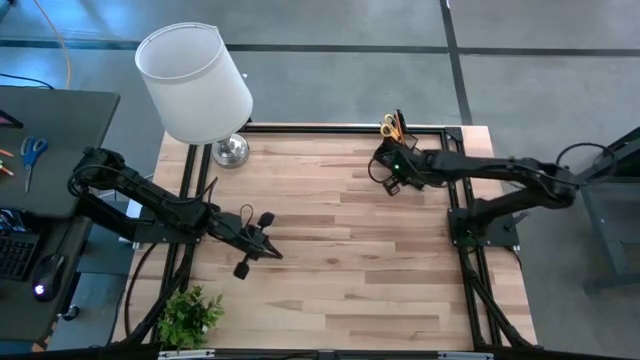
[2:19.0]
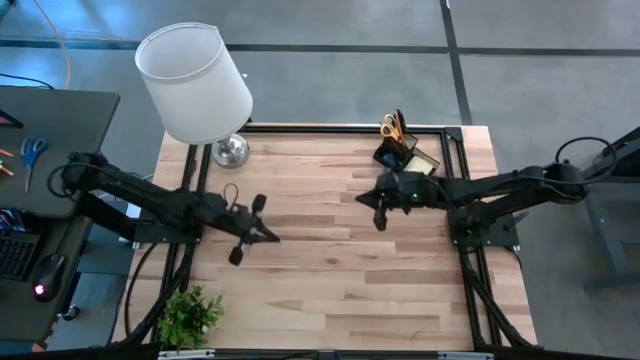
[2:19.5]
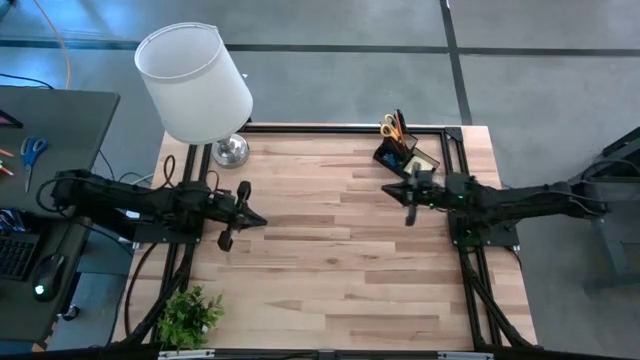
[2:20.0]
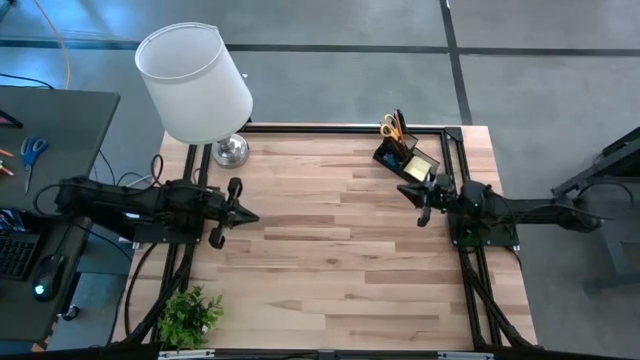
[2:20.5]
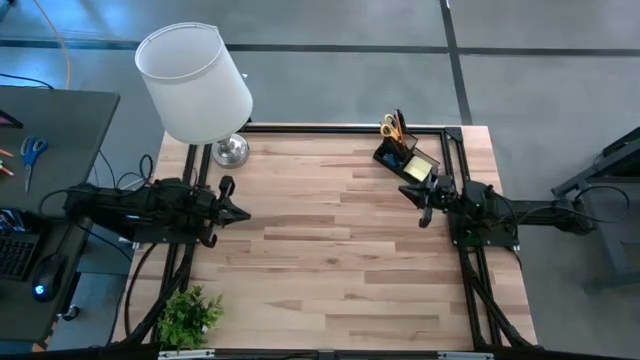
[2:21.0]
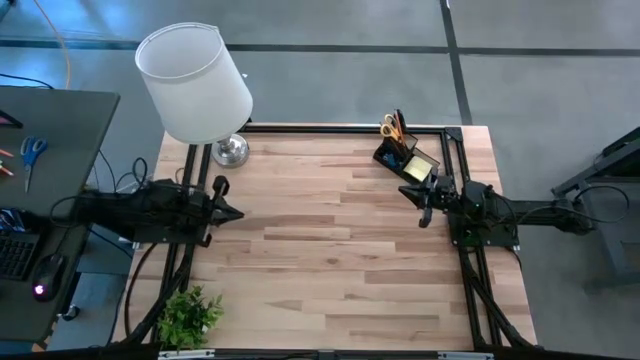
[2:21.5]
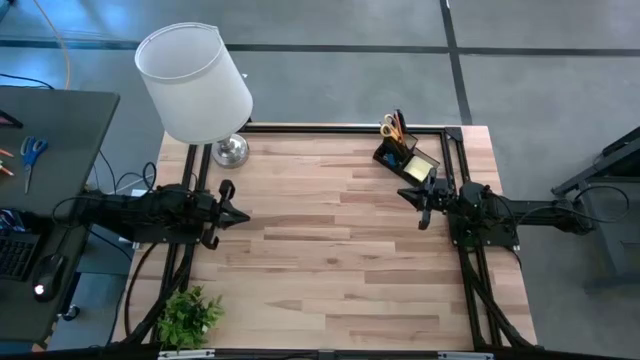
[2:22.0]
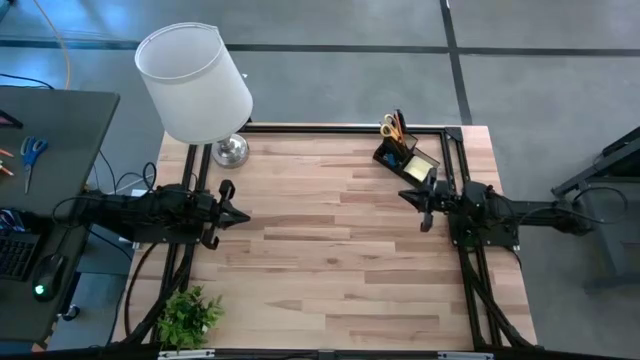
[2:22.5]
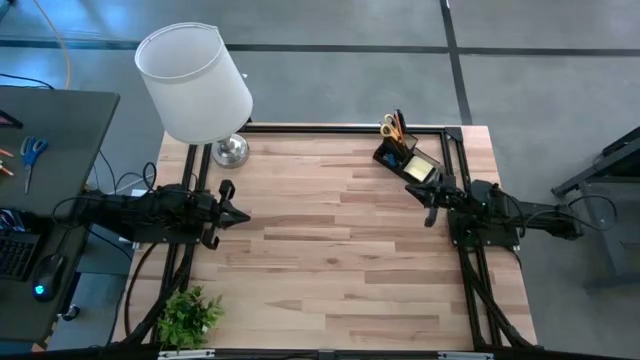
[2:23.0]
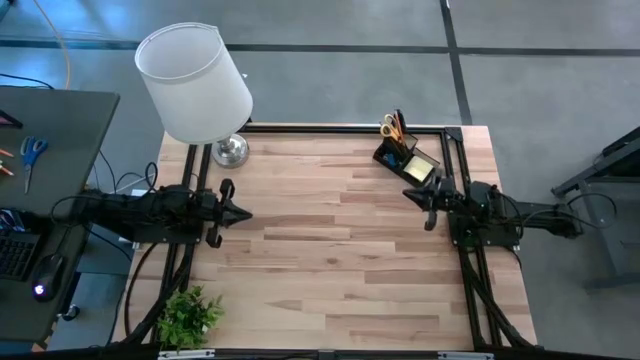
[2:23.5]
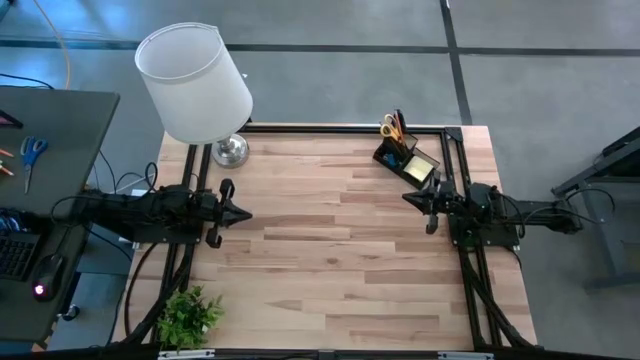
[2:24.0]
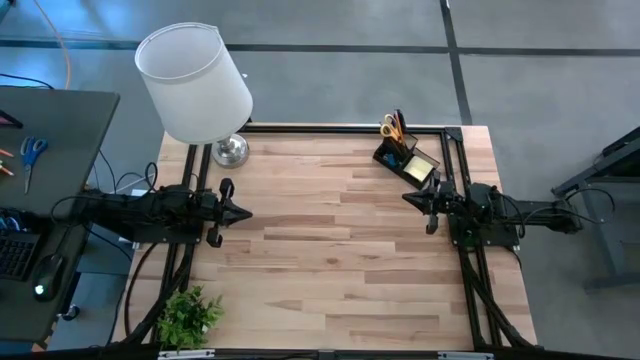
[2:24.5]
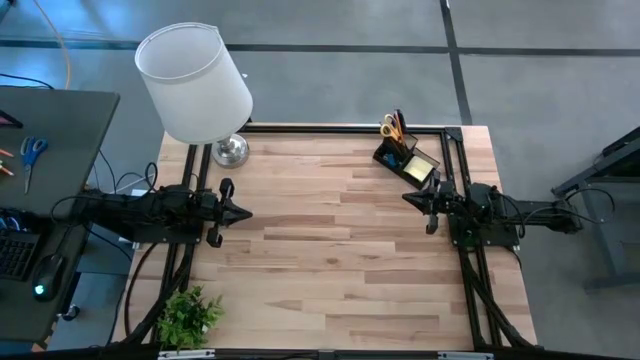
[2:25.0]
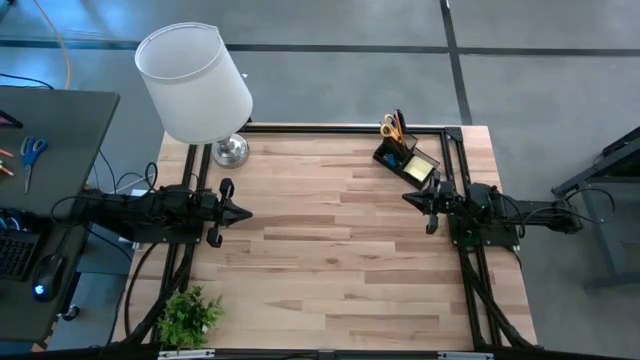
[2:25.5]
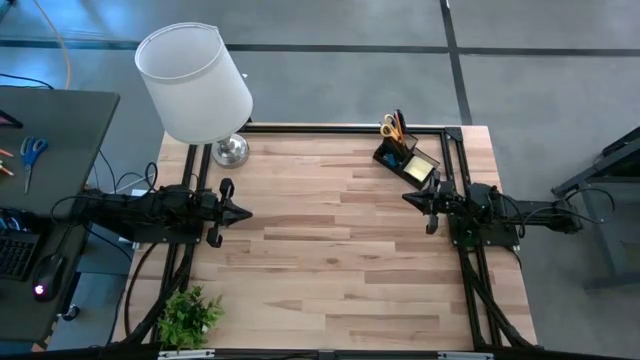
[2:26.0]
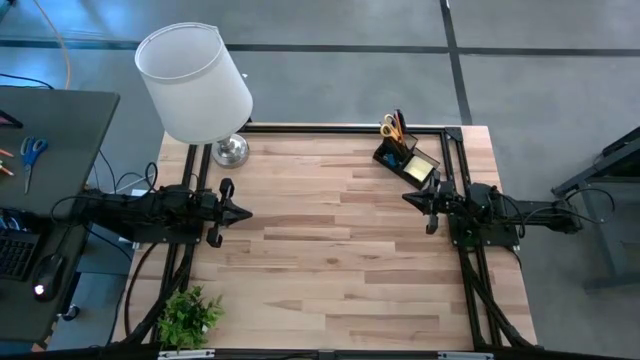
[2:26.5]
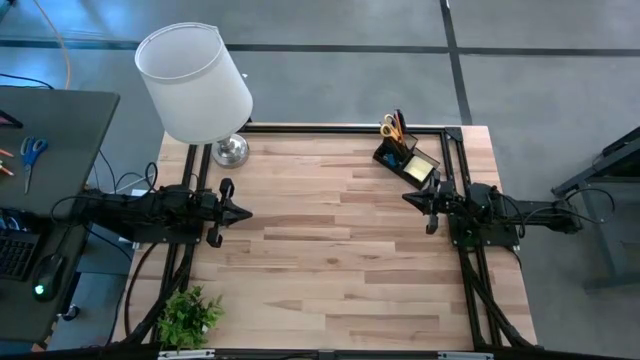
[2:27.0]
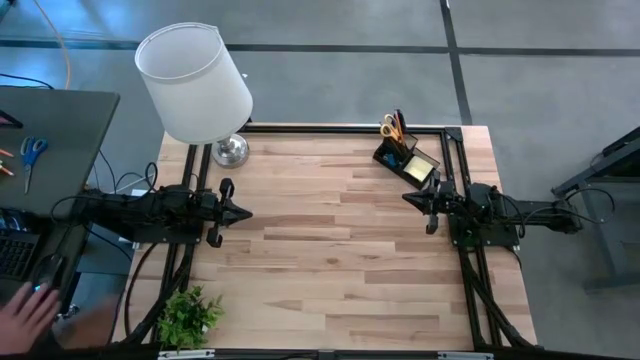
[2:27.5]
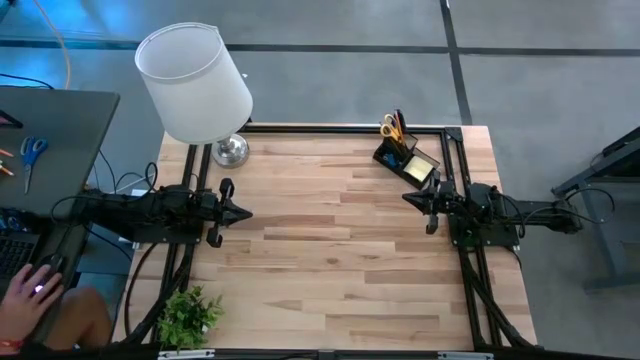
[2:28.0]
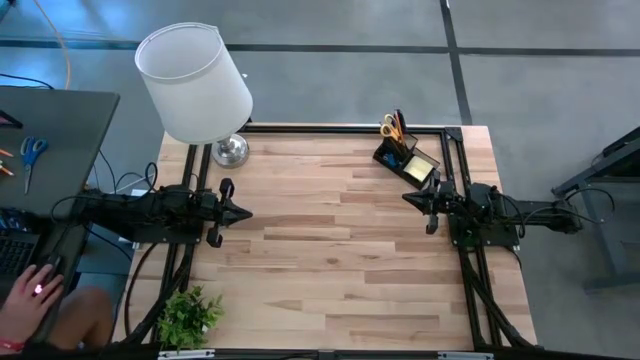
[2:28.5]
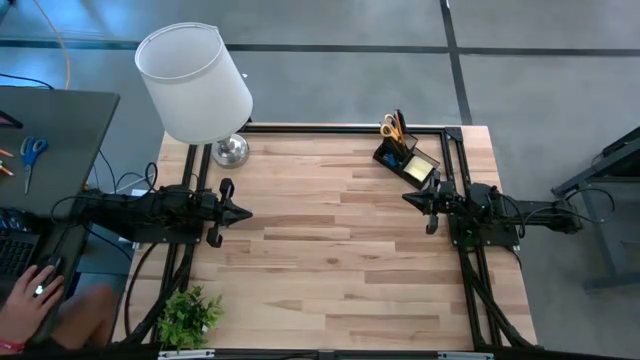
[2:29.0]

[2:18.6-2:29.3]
Task: Pick and place office supplies into organizer
Return to Home Position

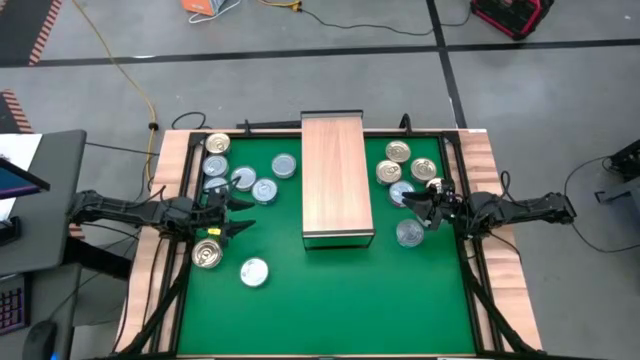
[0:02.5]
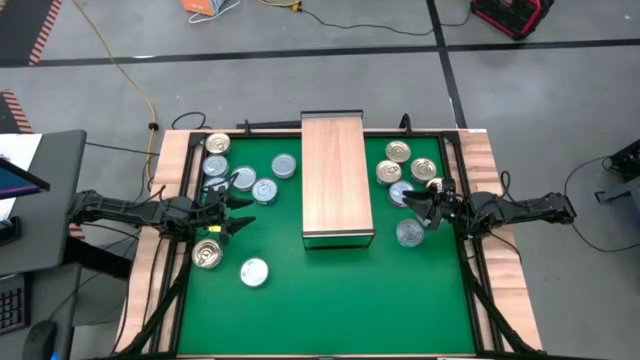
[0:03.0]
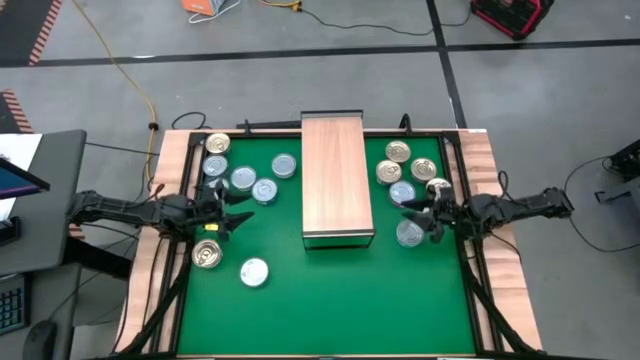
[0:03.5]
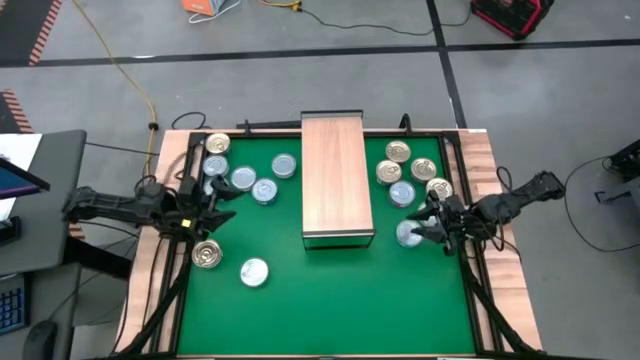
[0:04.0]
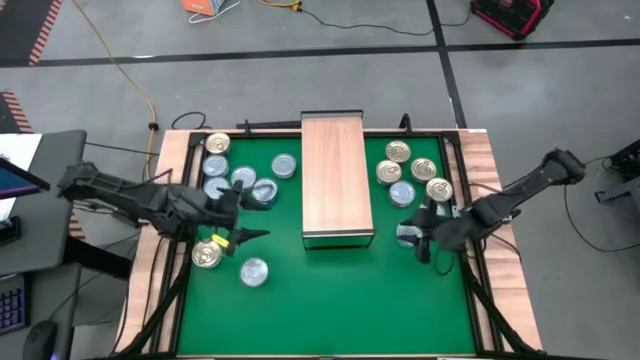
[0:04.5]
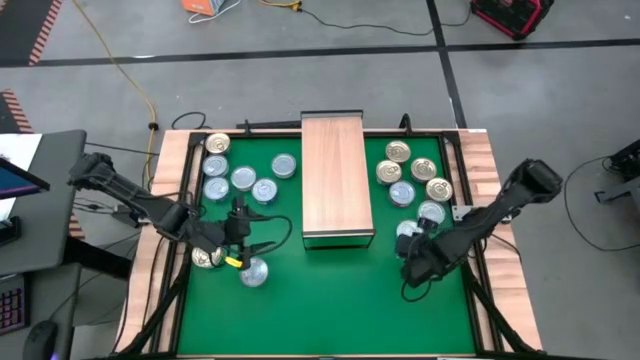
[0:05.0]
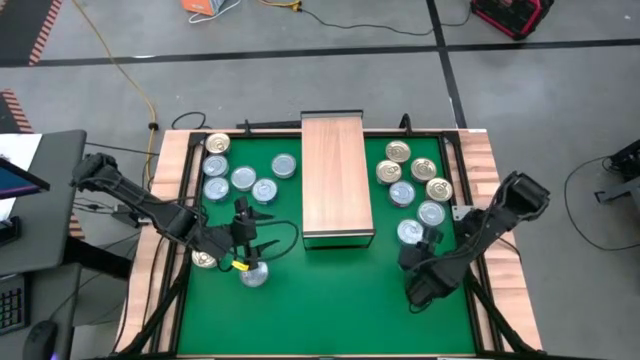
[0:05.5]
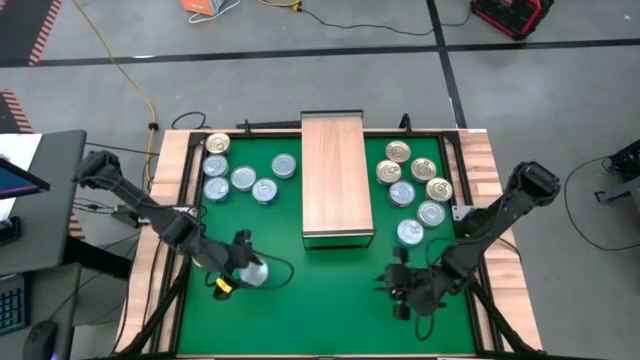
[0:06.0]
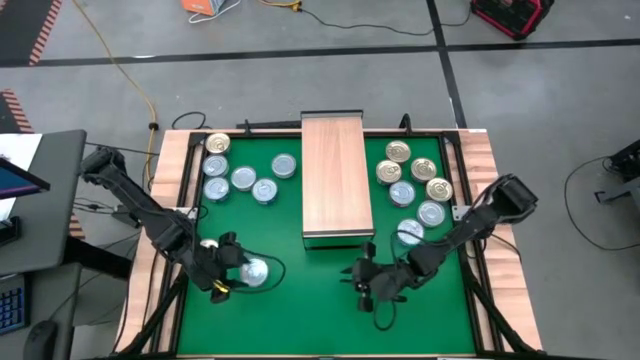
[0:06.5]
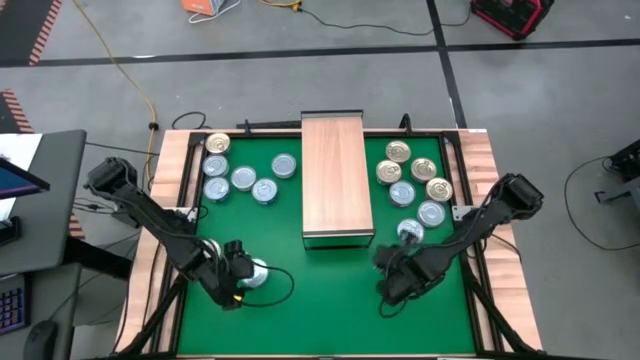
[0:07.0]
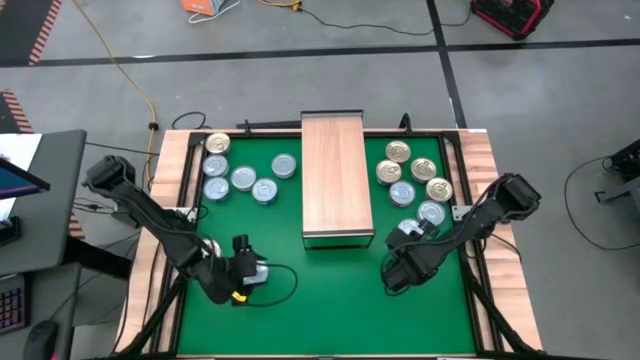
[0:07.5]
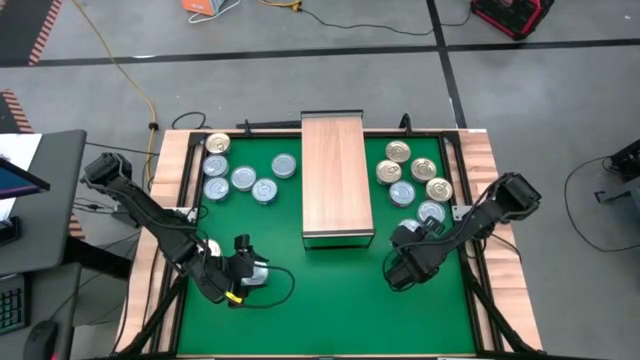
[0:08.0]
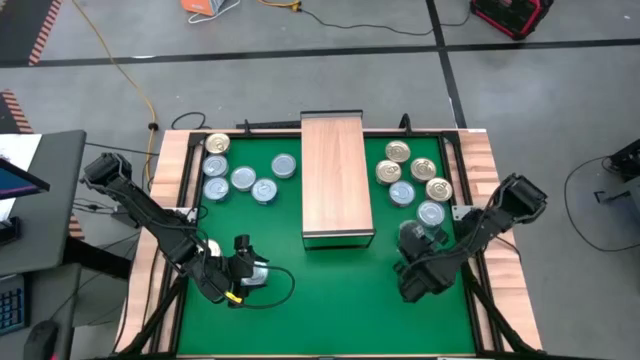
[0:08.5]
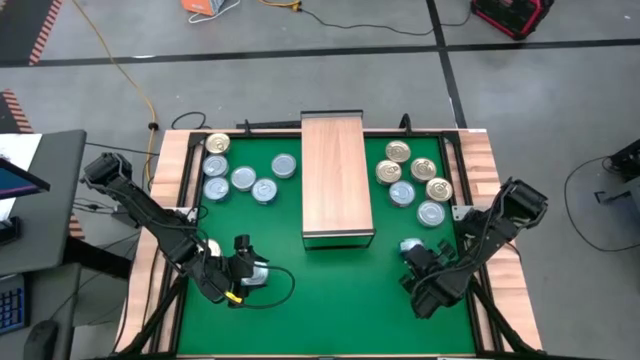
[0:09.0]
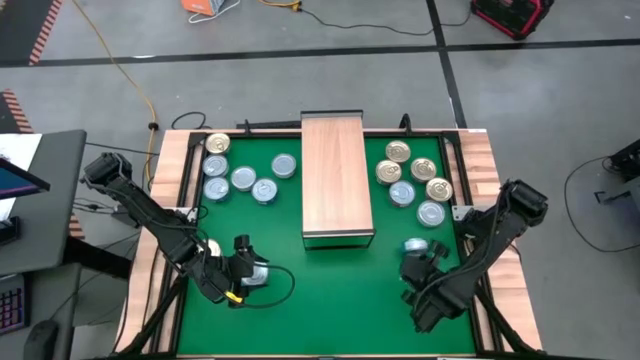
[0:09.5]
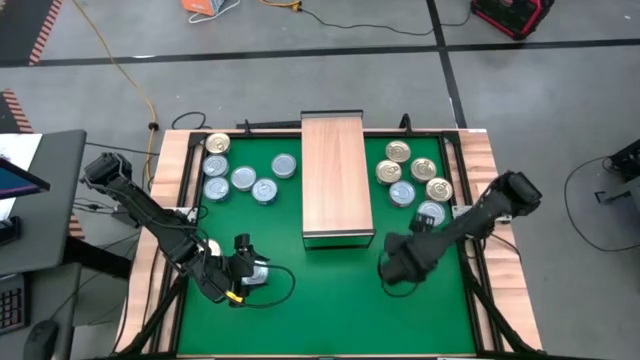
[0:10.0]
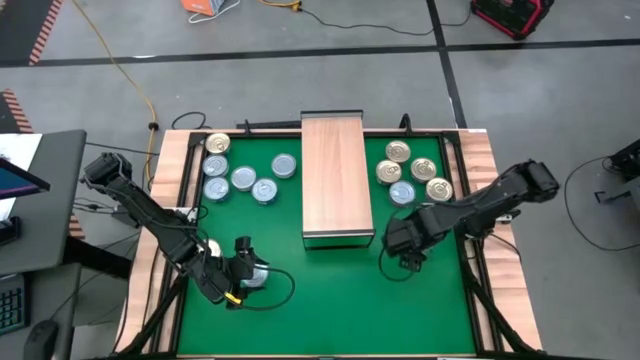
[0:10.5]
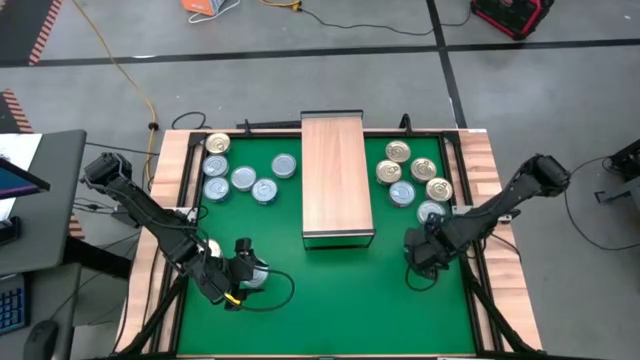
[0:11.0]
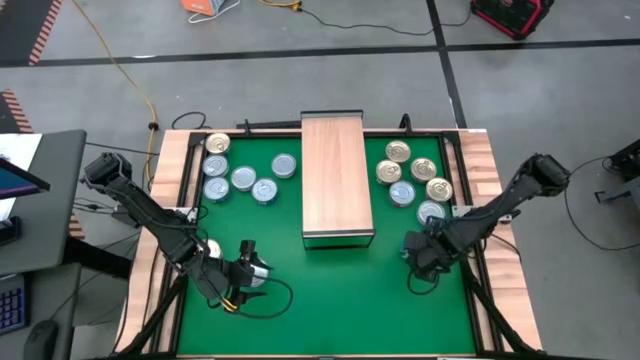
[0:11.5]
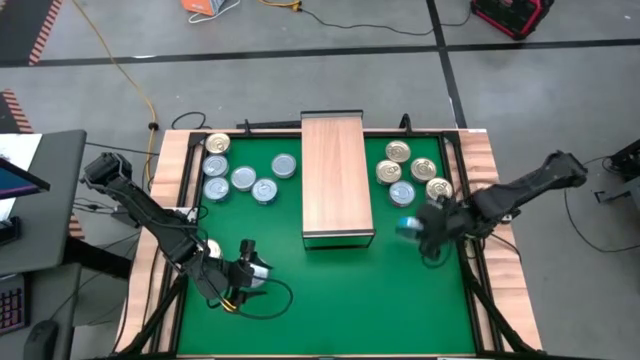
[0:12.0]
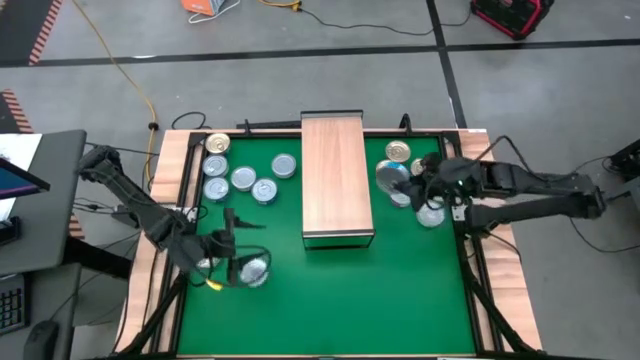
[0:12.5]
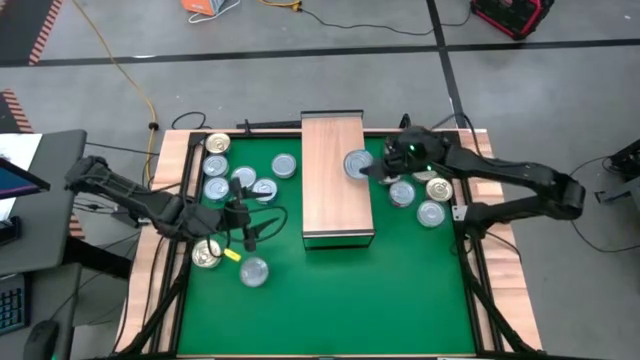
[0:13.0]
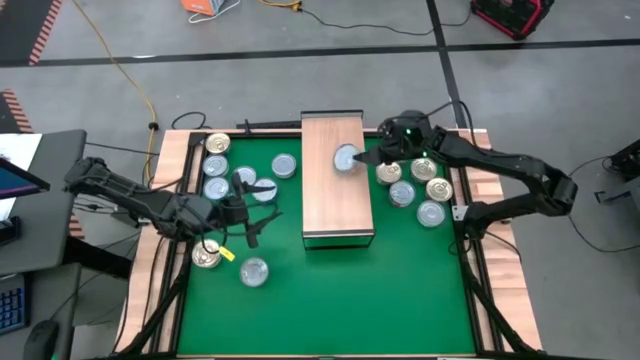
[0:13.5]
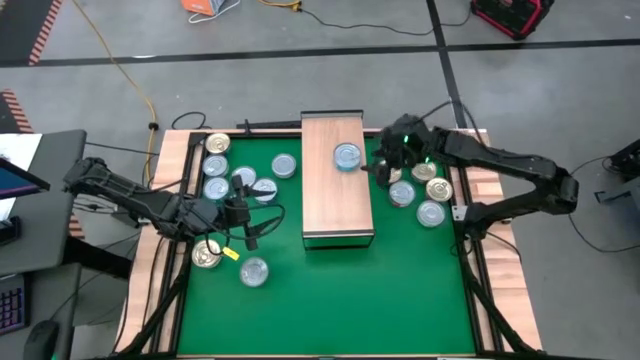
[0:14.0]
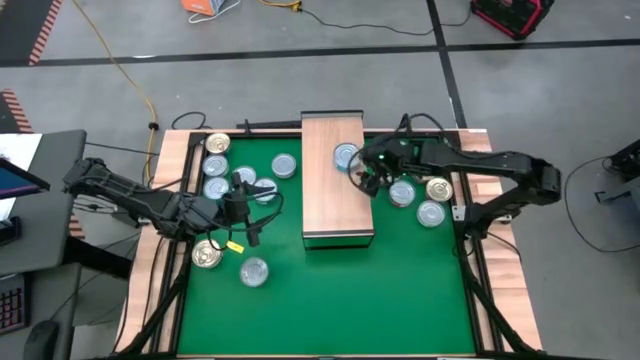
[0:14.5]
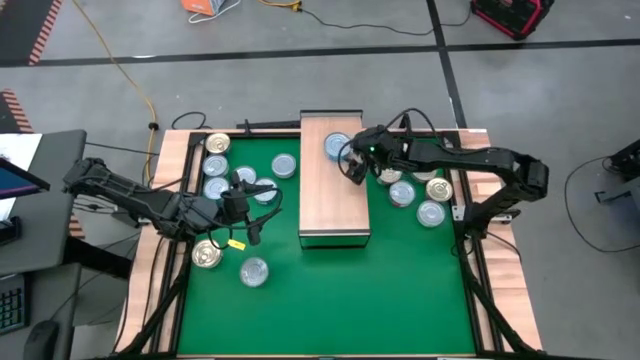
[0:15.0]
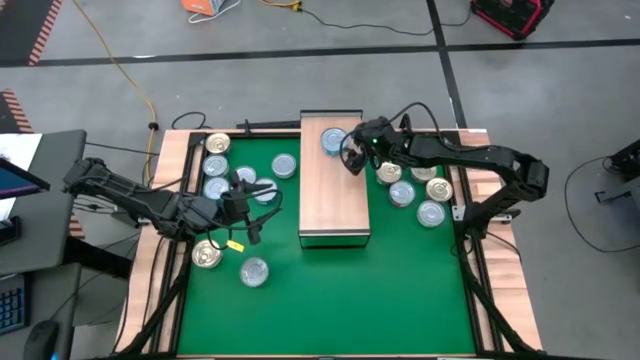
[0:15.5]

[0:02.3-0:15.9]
Task: Stack canned seafood by type on shelf
Put the light blue tuna can on the shelf
